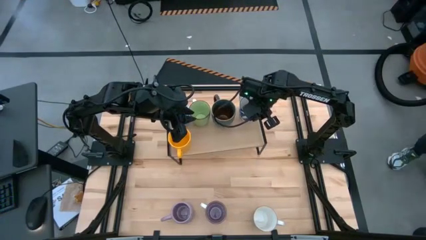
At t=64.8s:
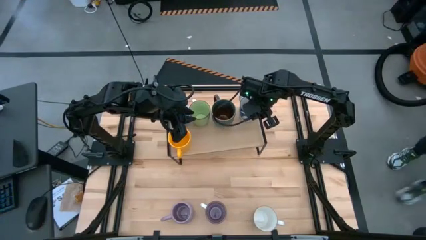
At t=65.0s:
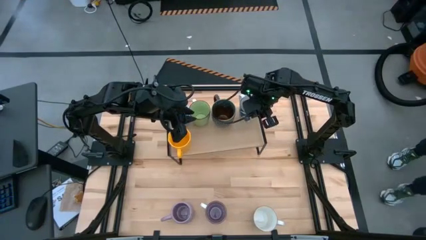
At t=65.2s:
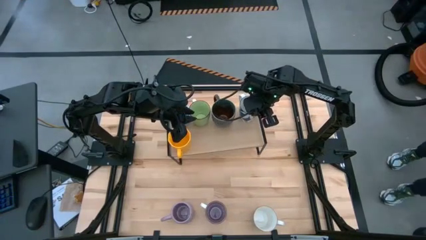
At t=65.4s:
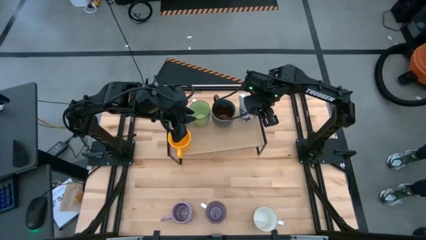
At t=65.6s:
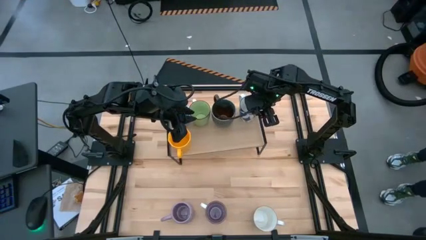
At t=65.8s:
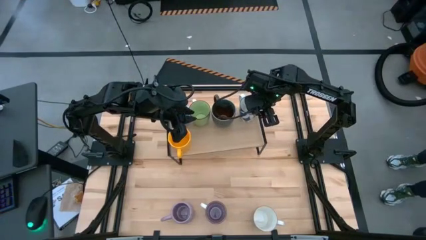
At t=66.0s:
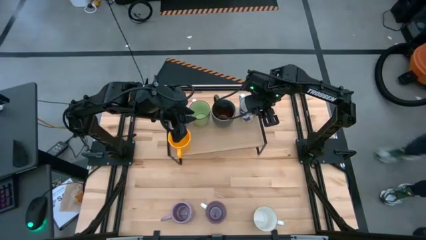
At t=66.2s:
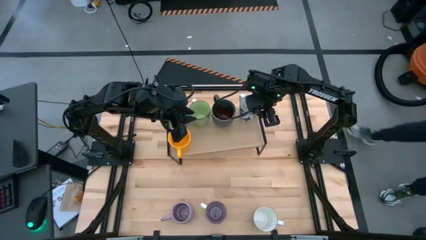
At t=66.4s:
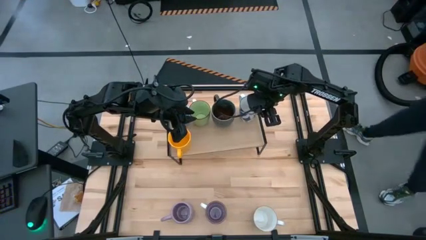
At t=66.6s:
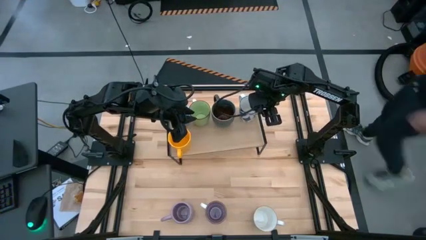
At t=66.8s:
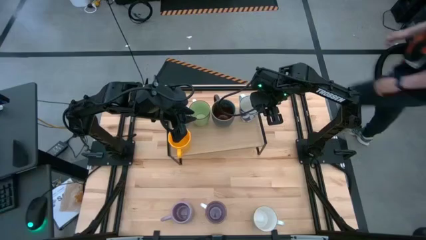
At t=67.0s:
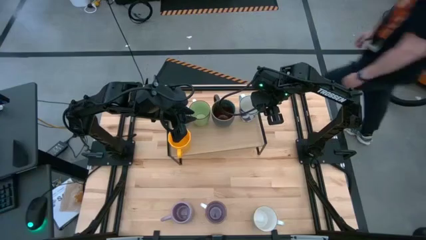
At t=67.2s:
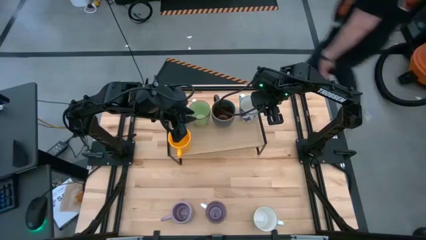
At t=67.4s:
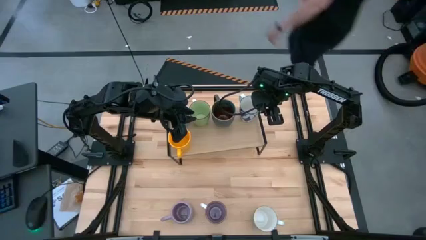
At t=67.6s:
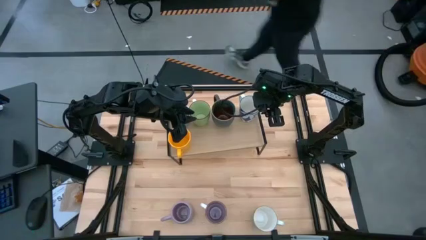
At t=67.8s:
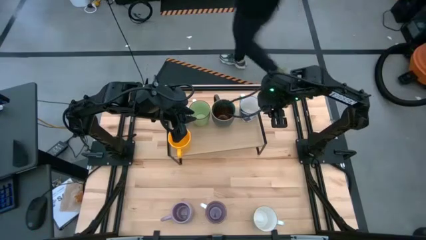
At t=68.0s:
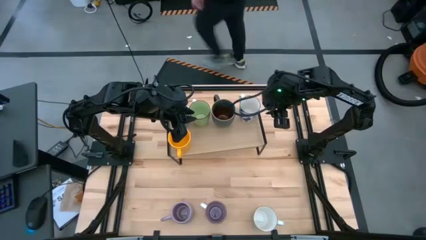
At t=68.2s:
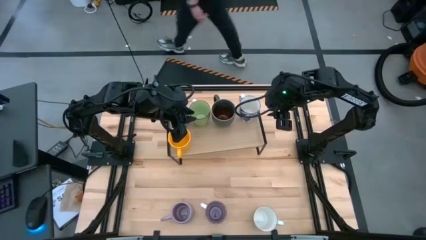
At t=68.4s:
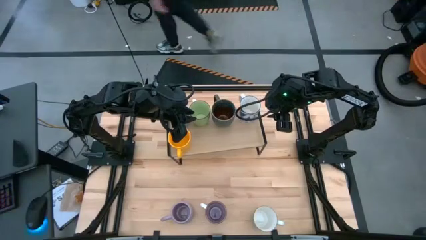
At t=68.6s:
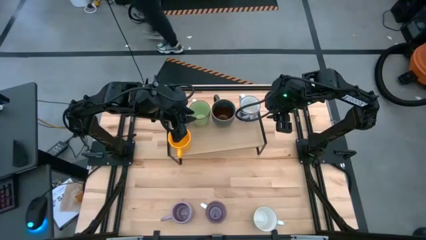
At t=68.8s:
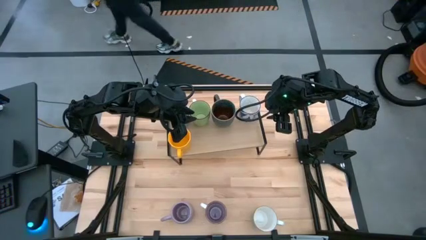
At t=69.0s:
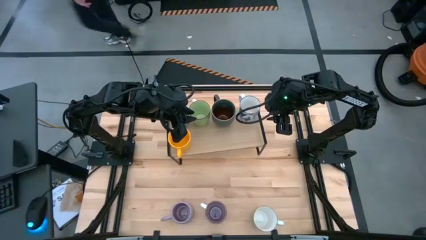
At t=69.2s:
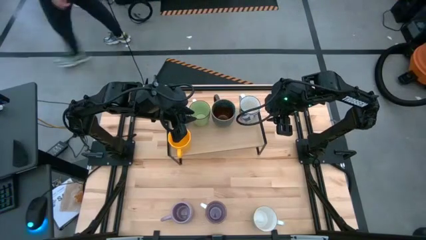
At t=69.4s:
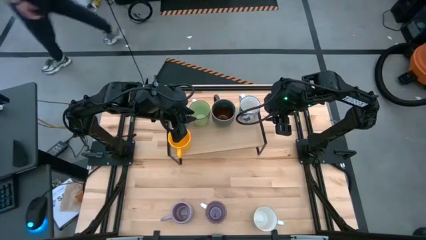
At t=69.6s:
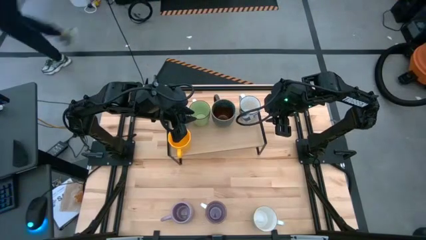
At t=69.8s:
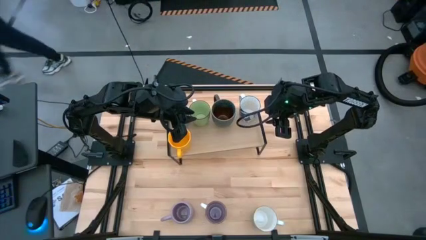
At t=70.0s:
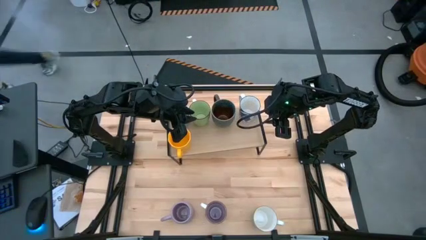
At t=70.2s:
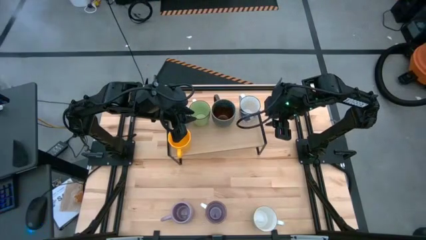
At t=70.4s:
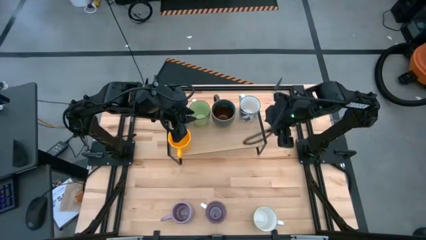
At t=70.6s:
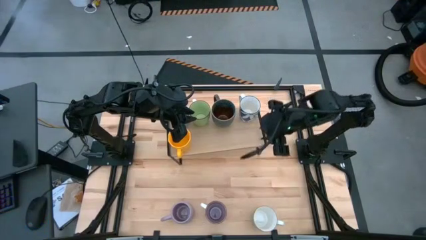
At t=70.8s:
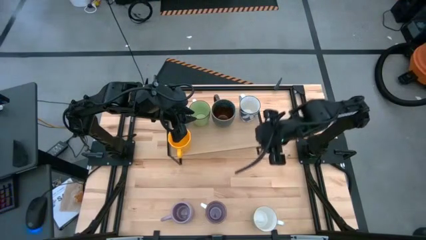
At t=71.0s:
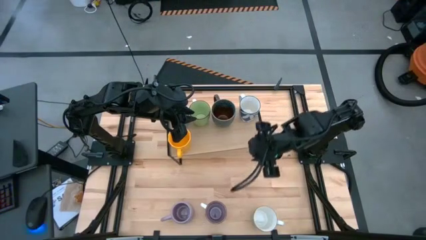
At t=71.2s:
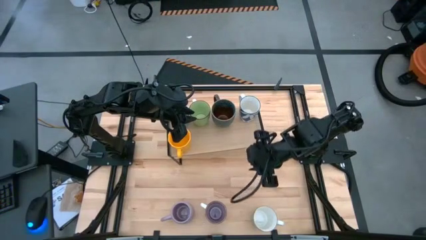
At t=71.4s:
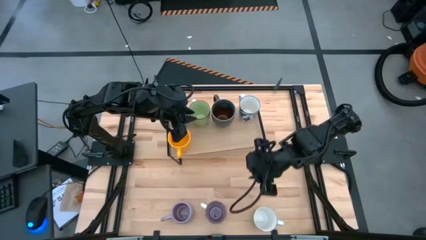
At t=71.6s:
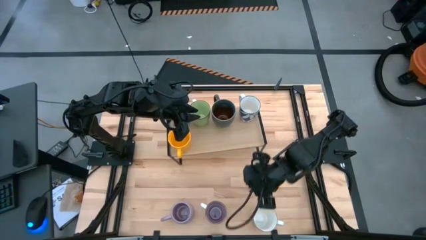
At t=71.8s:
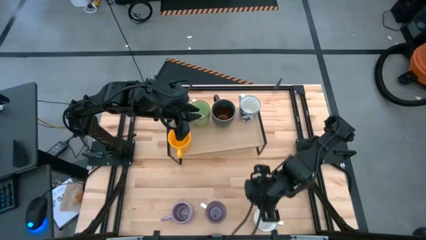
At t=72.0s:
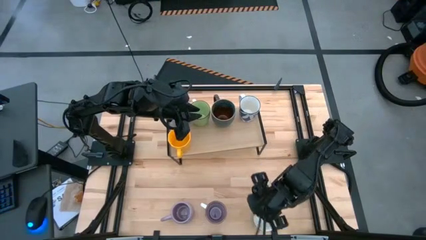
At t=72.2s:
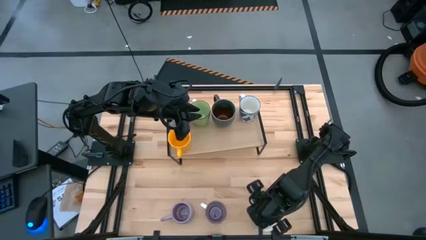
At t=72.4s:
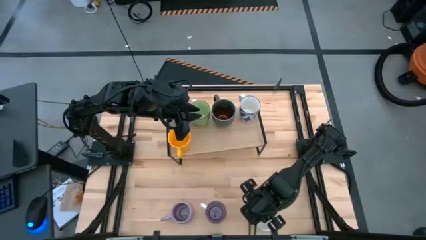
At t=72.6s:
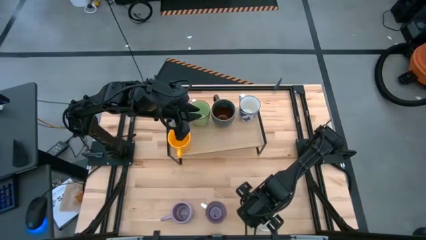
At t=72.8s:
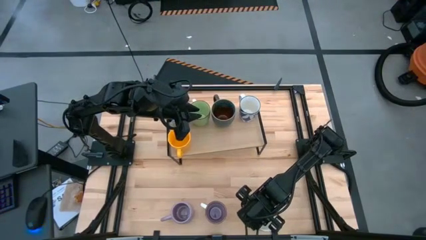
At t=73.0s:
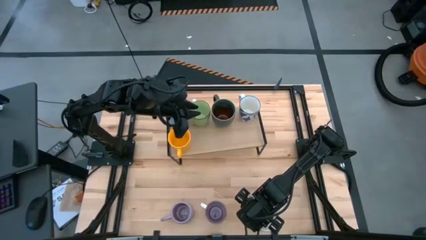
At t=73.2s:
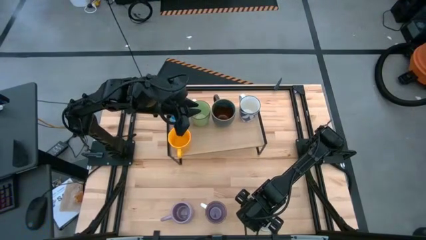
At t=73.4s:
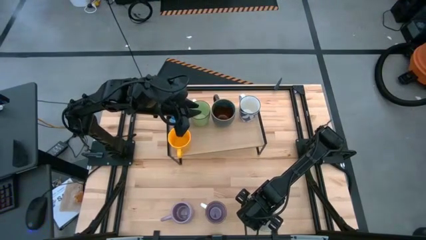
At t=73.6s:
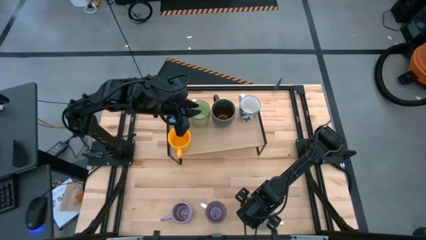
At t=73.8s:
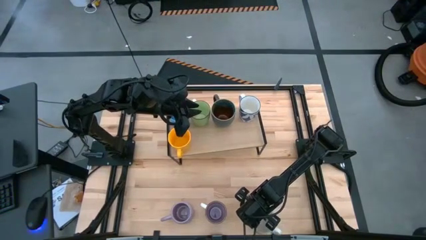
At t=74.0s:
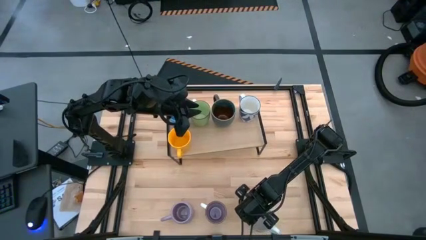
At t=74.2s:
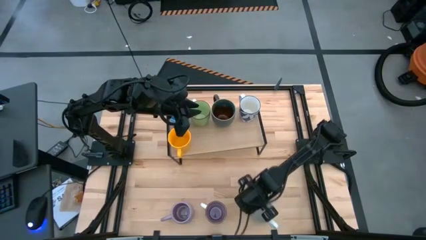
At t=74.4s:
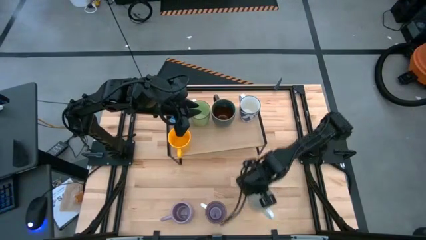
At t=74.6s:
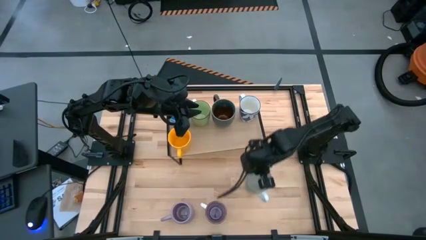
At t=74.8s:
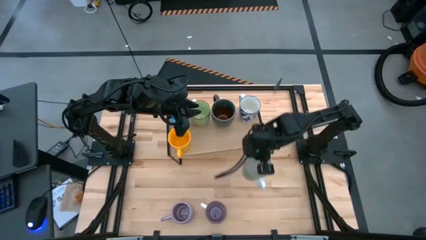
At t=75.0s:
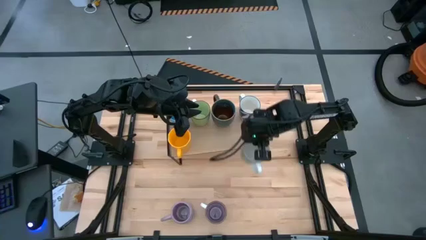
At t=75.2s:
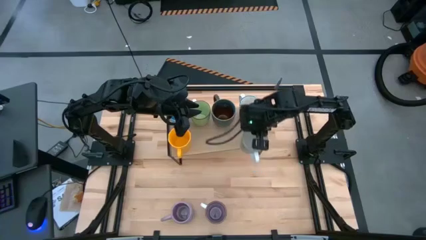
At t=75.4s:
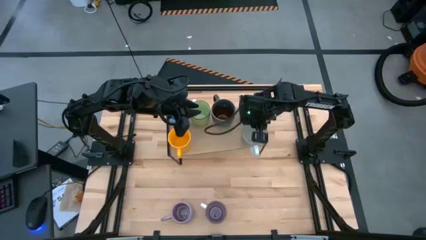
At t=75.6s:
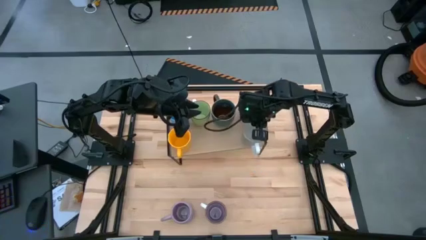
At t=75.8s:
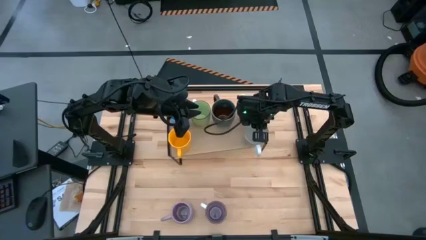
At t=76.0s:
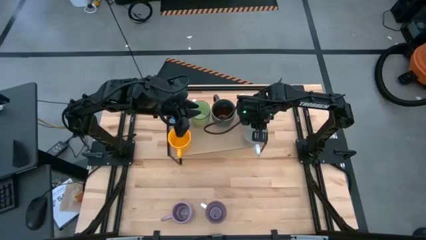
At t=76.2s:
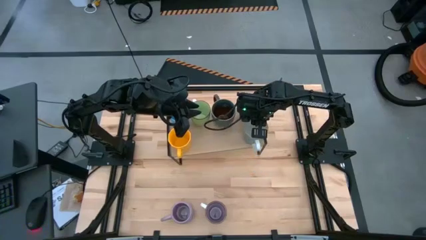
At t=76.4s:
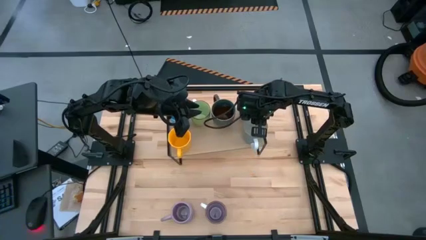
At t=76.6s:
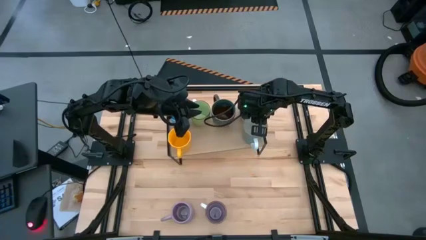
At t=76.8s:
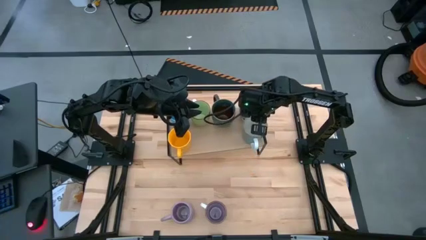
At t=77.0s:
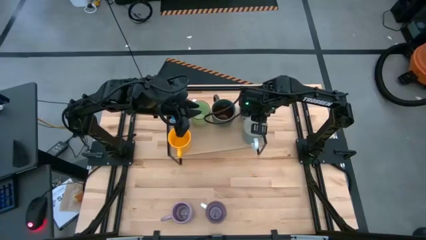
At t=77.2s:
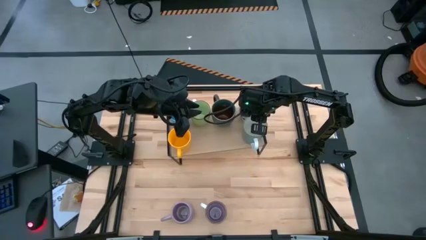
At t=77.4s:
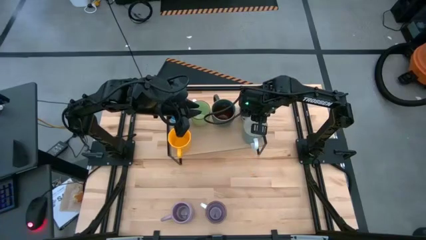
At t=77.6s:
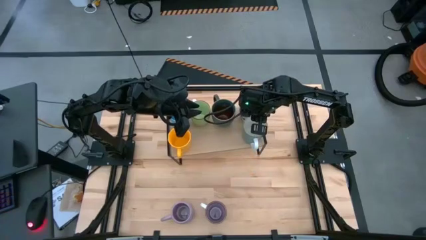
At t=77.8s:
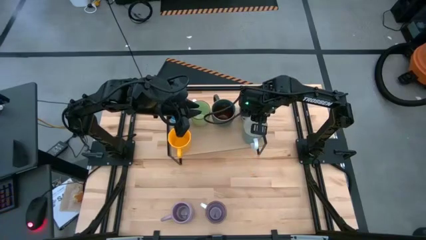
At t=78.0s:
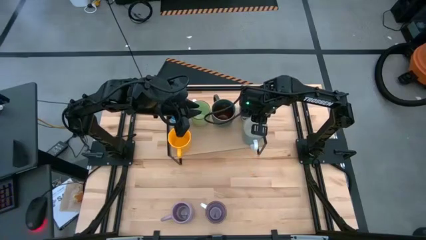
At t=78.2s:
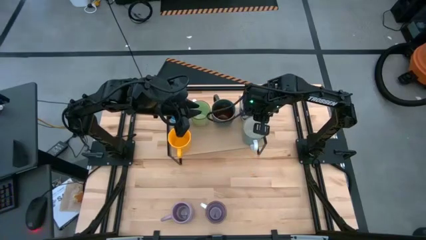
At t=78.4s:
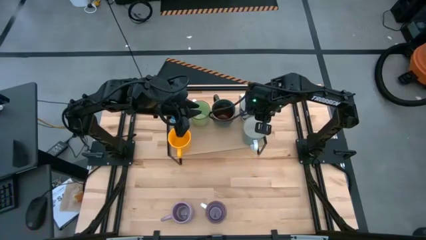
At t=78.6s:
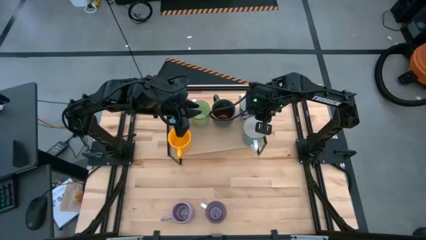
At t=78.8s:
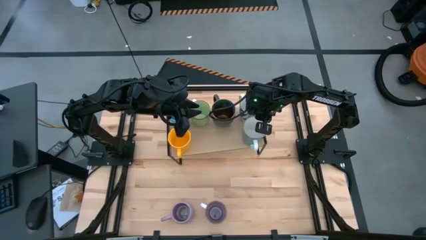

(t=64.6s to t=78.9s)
Task: Place coffee mugs
Put the blue mug on the shelf
